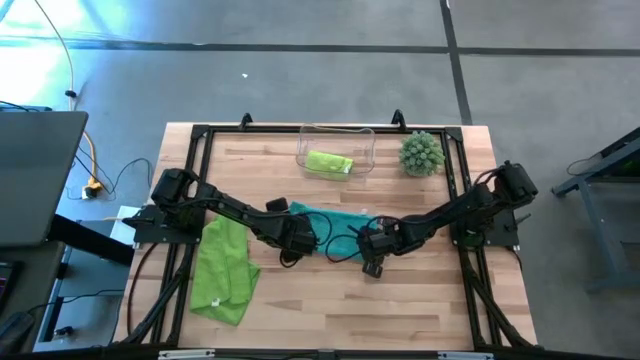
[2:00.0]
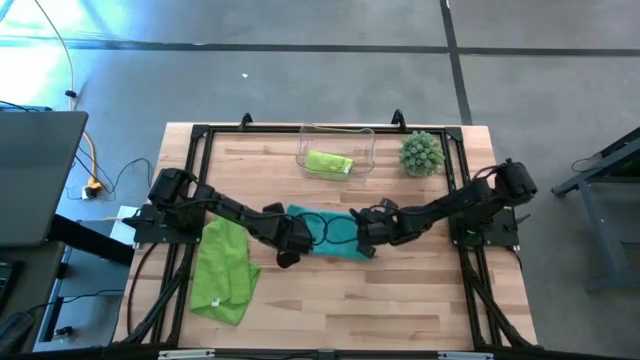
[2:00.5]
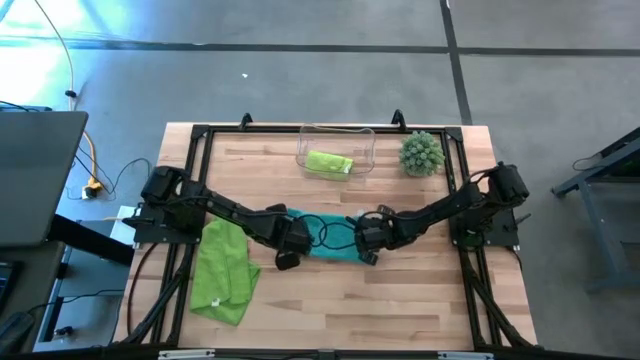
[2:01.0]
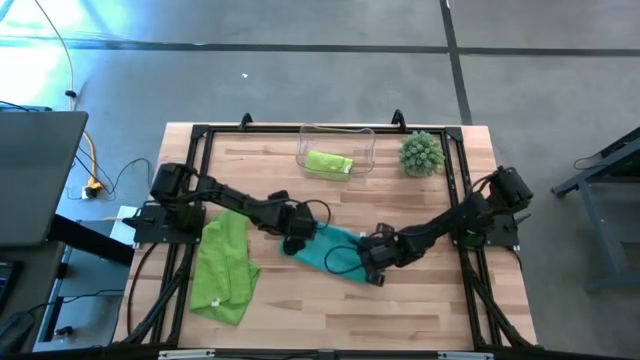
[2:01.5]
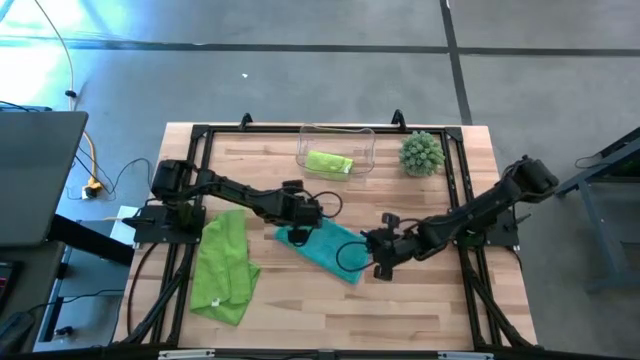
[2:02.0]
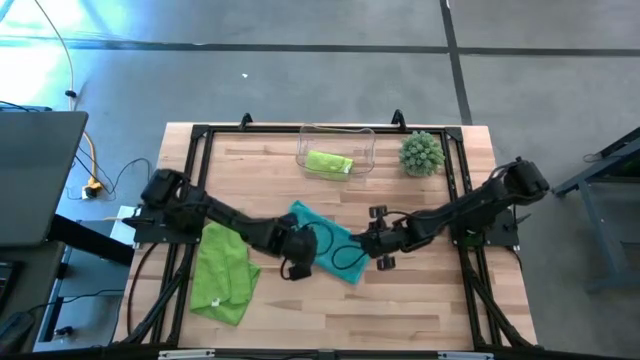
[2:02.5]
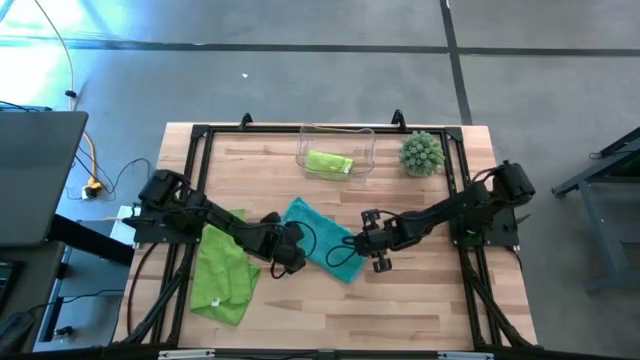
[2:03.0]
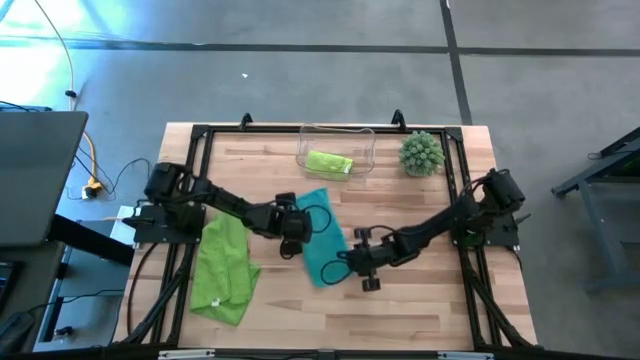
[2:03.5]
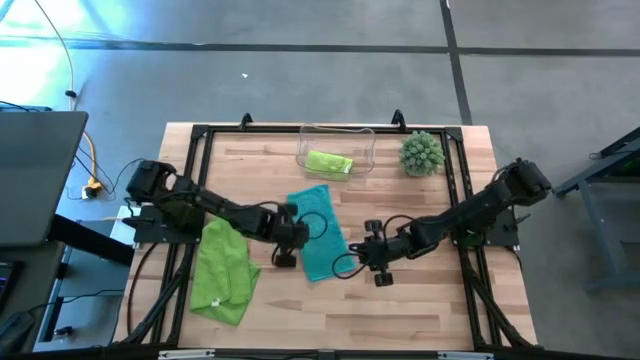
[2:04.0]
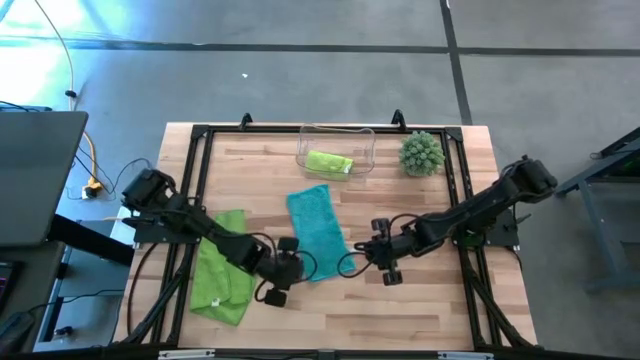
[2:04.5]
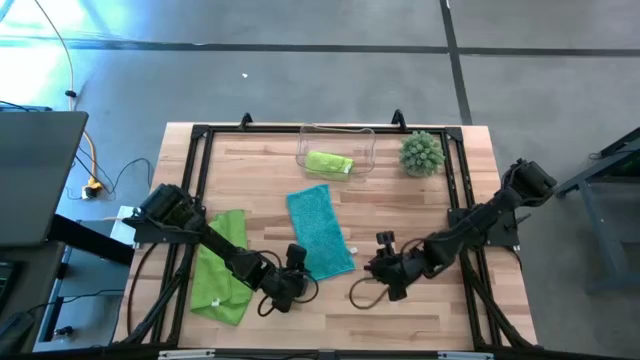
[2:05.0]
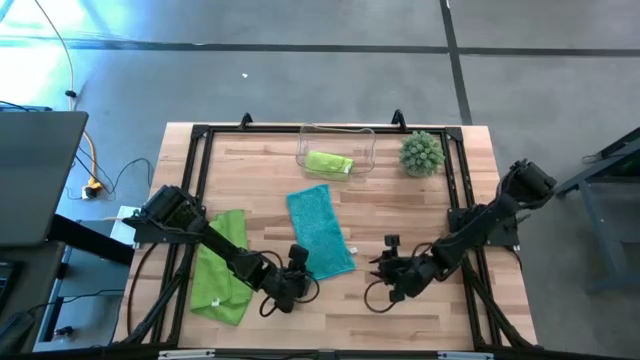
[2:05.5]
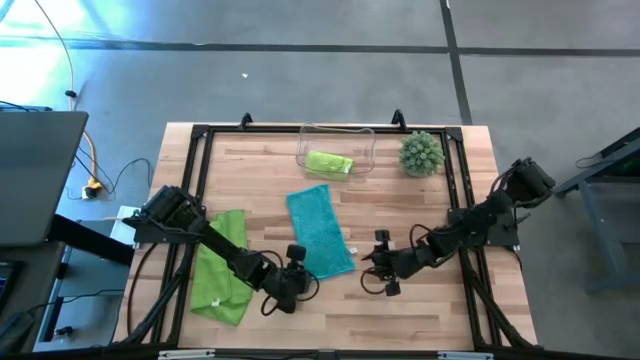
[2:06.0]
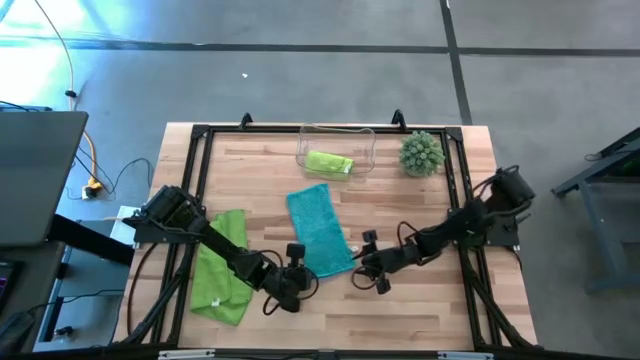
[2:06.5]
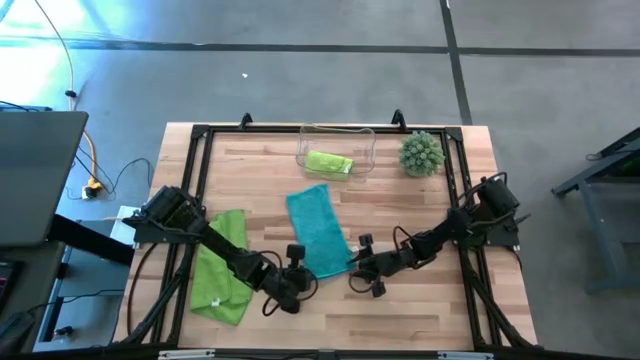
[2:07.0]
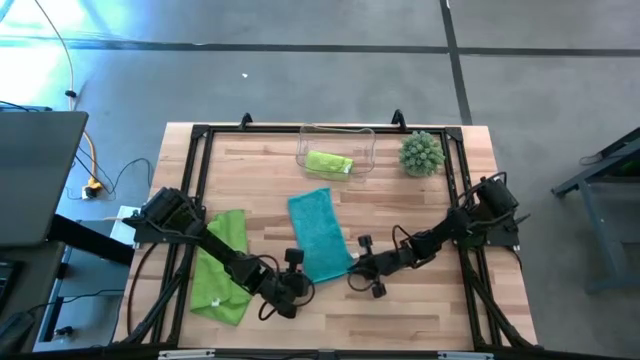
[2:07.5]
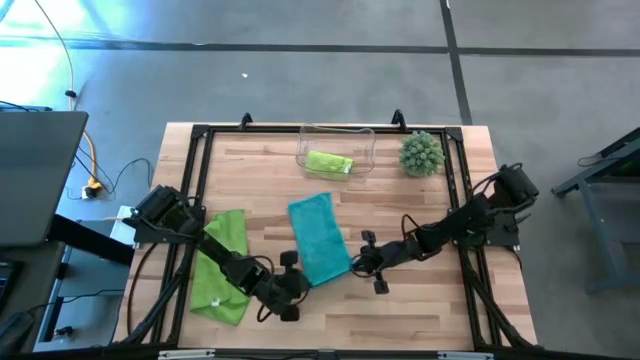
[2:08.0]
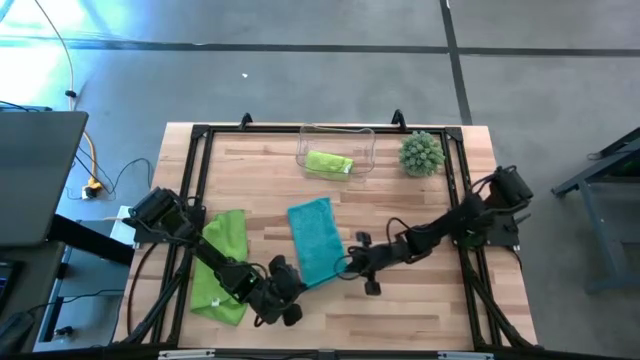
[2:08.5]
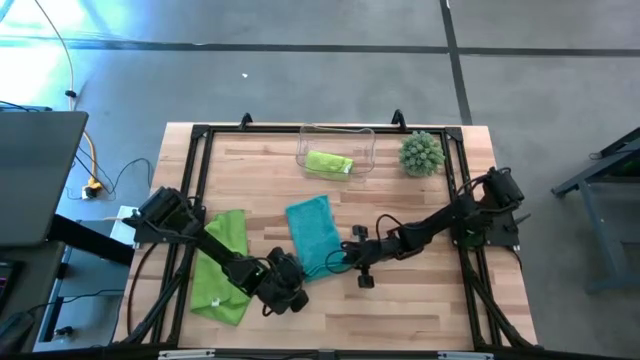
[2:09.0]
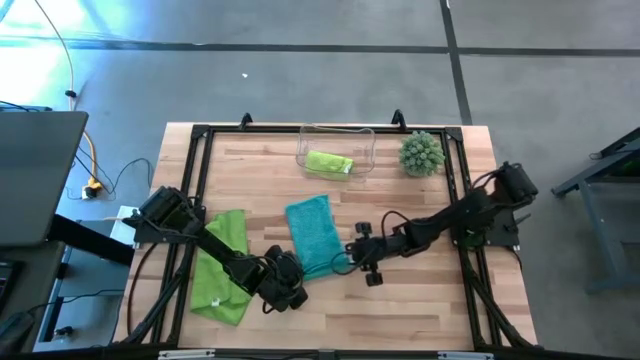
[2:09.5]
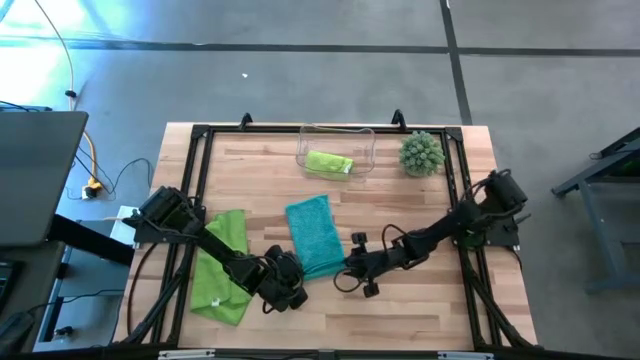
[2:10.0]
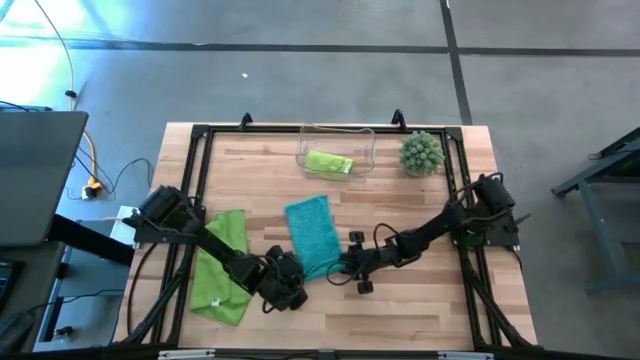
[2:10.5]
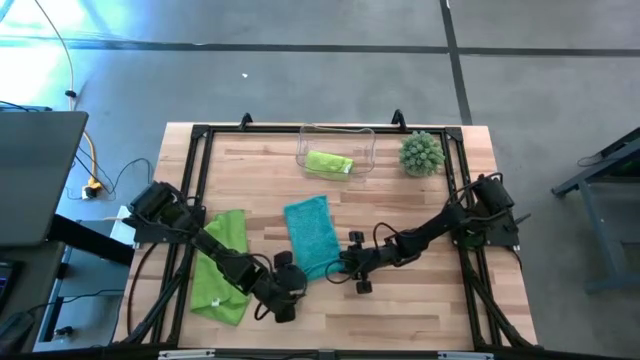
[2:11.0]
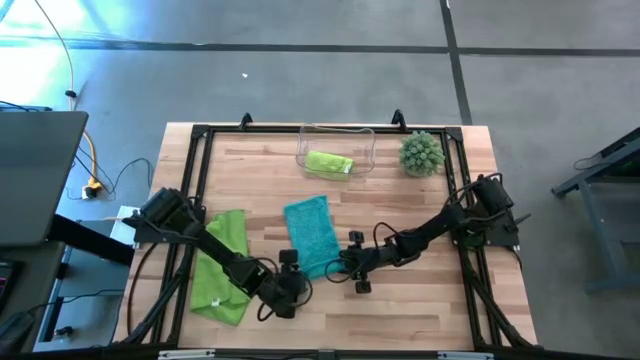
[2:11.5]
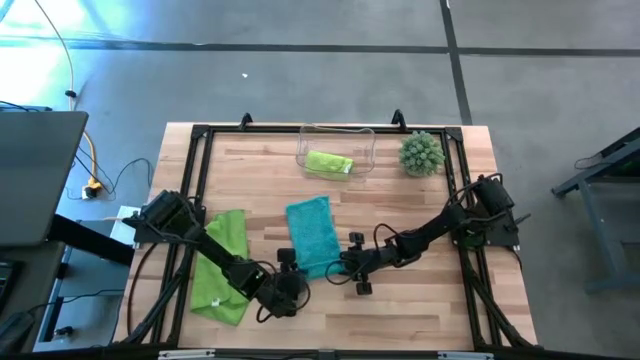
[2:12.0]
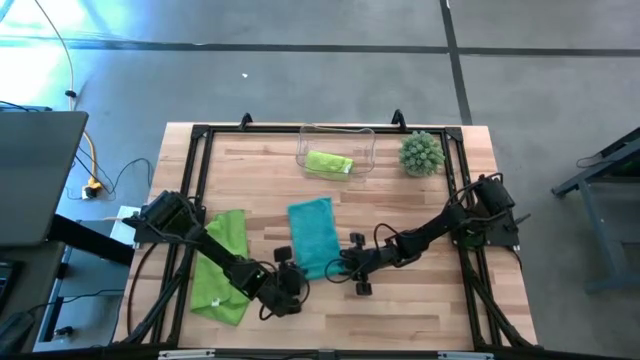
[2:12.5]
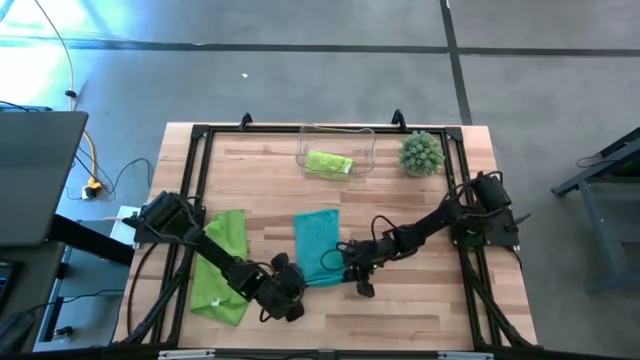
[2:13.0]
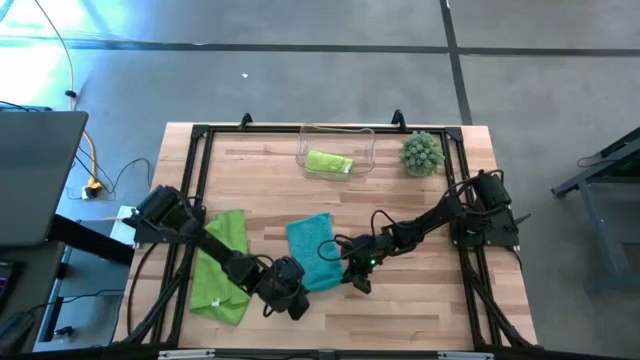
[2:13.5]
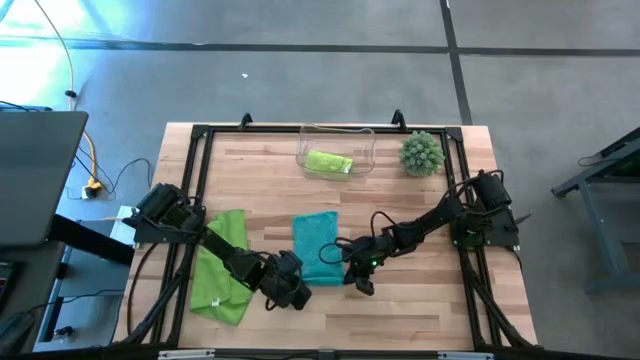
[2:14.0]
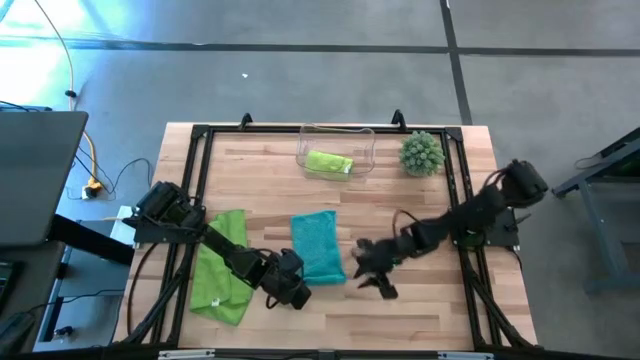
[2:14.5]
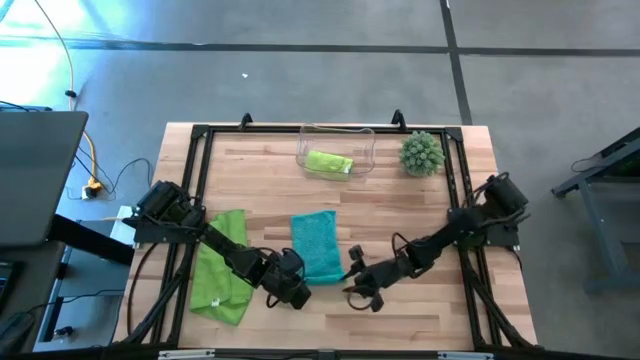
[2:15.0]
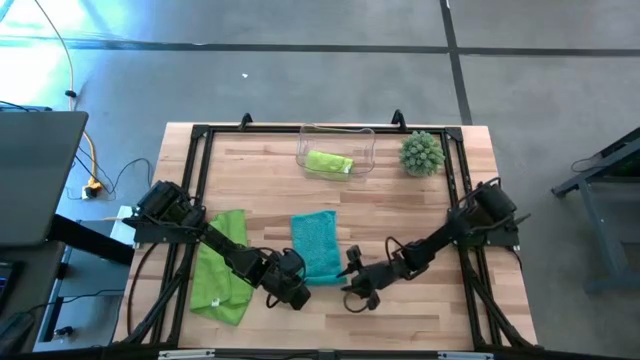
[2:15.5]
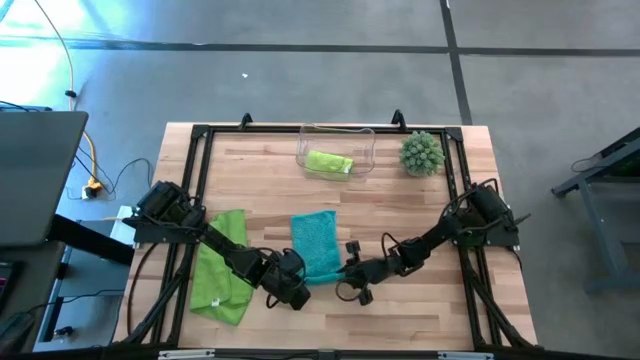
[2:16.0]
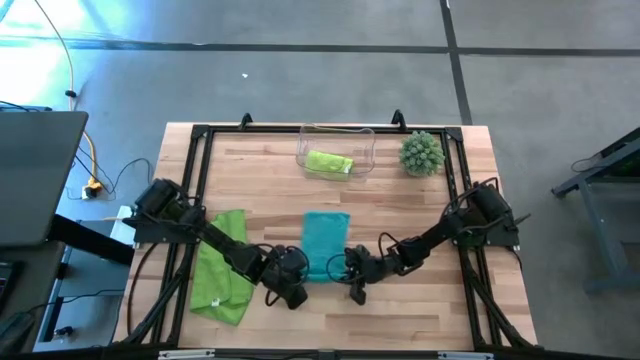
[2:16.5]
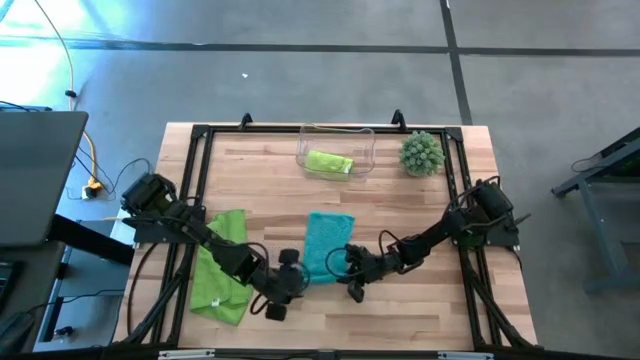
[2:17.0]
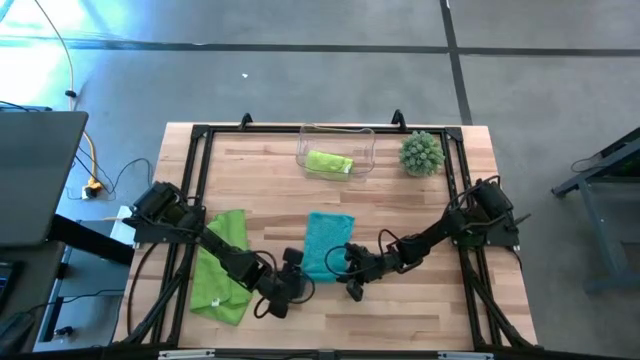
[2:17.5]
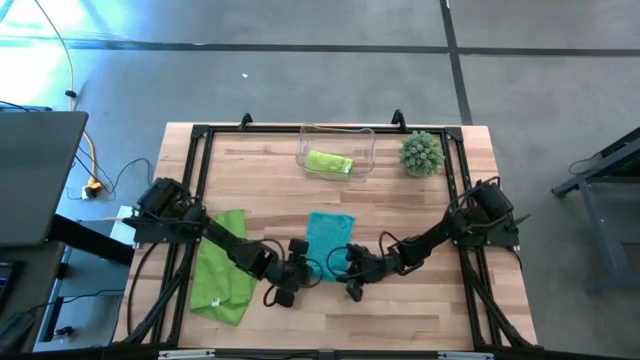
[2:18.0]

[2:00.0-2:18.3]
Task: Roll microfiber towels into tight, uniform cylinder then place into a basket
Roll the blue microfiber cloth

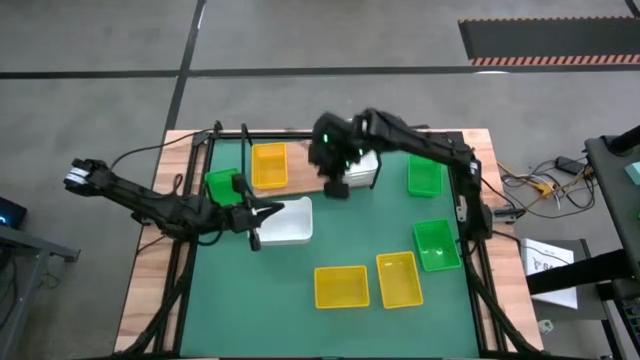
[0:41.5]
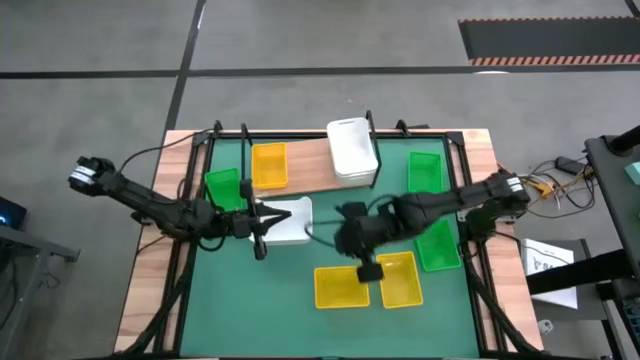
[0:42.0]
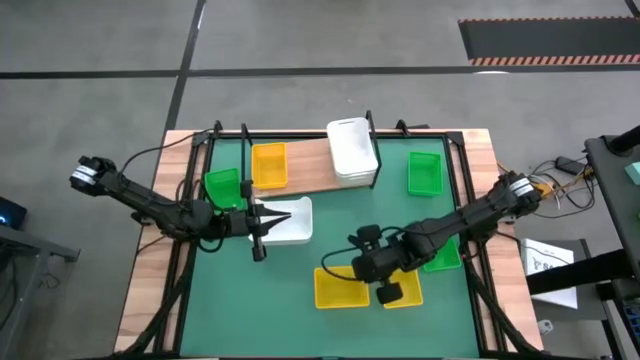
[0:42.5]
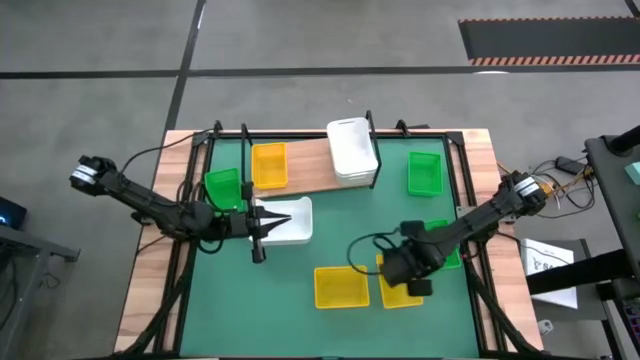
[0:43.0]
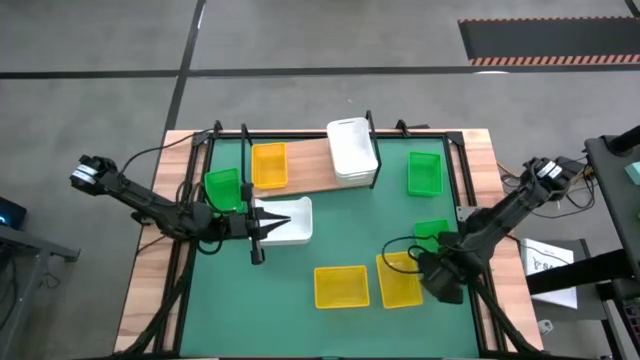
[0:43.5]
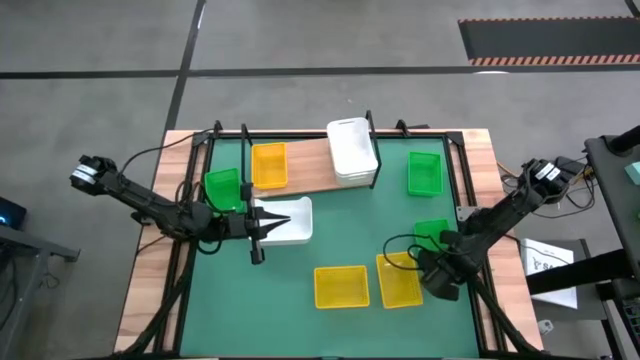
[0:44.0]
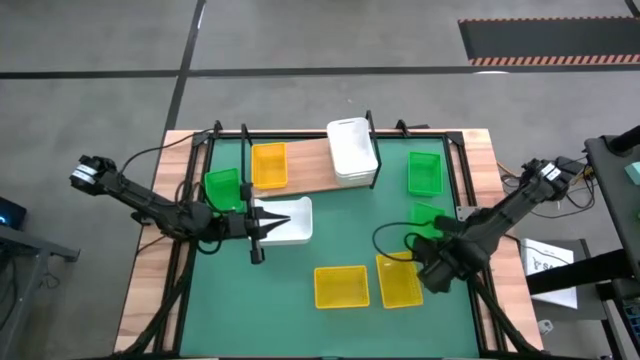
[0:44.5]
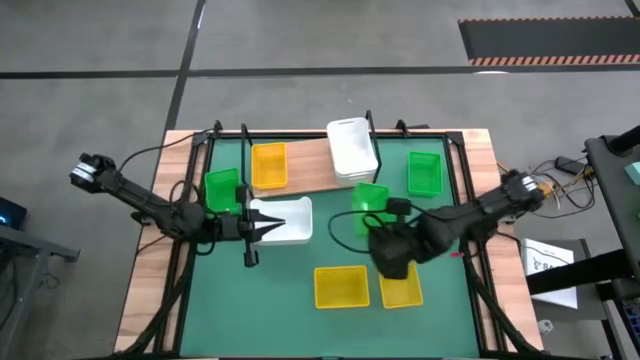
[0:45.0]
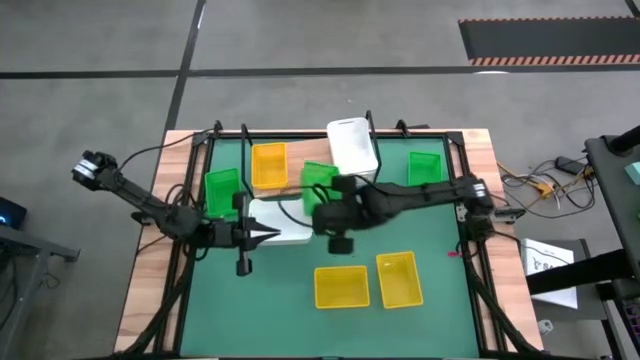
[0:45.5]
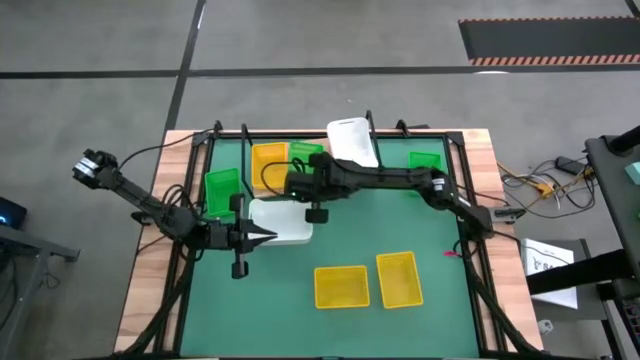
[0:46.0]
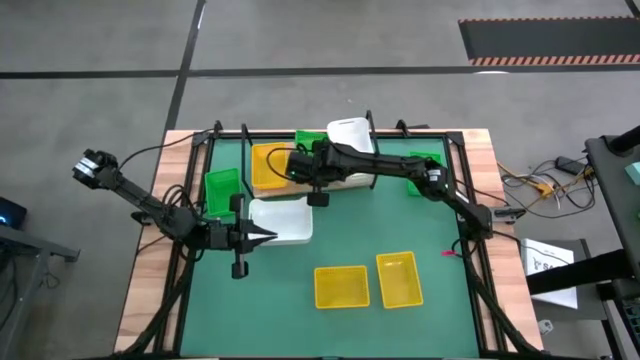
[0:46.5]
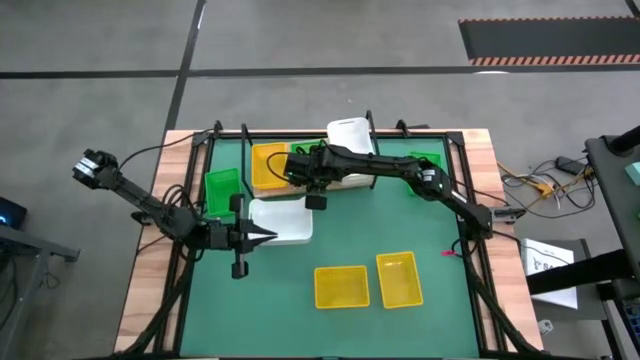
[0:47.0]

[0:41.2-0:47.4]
Task: Stack baskets on shelf by color
Put the bottom right green bin on the shelf
